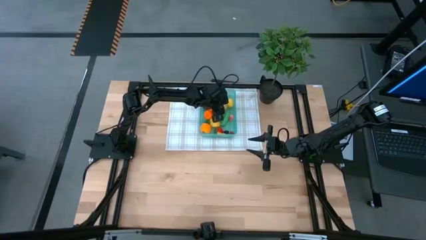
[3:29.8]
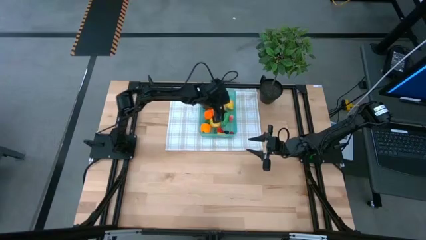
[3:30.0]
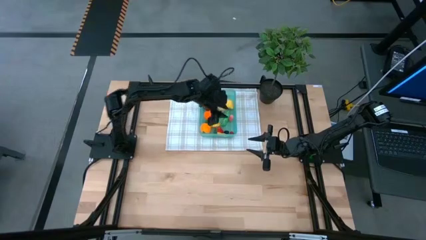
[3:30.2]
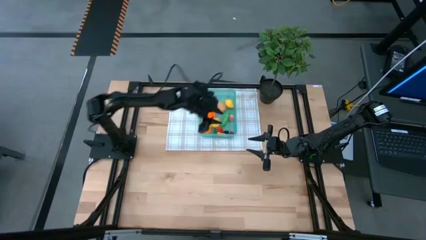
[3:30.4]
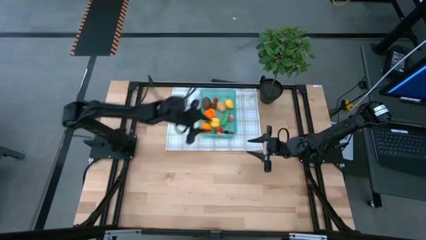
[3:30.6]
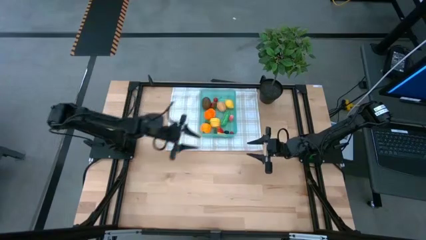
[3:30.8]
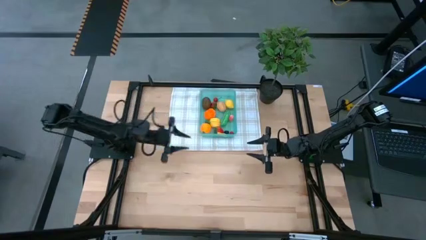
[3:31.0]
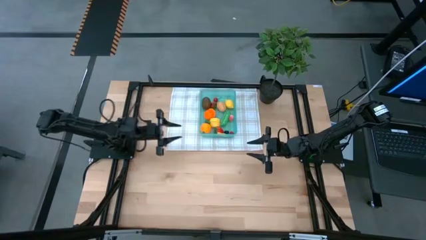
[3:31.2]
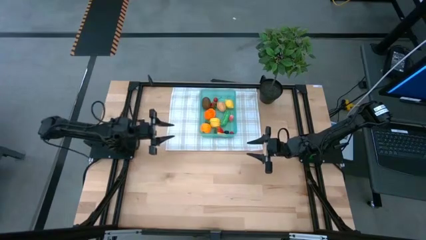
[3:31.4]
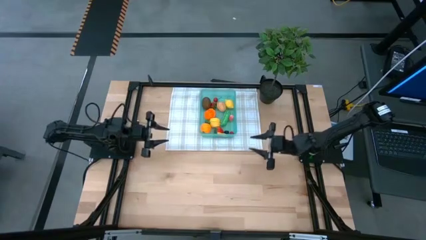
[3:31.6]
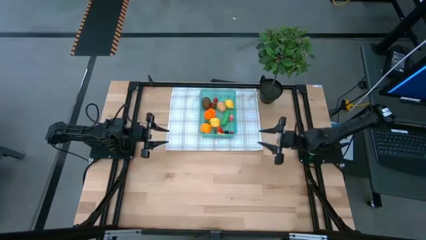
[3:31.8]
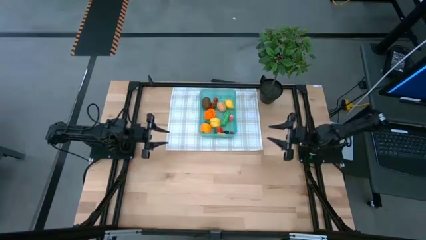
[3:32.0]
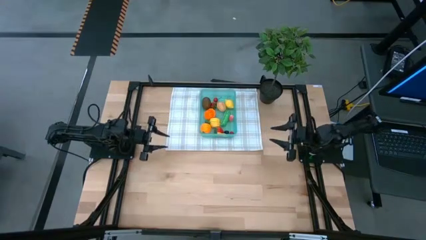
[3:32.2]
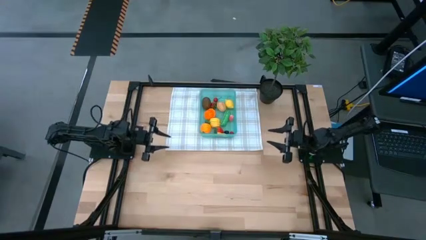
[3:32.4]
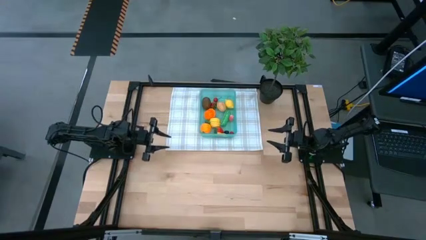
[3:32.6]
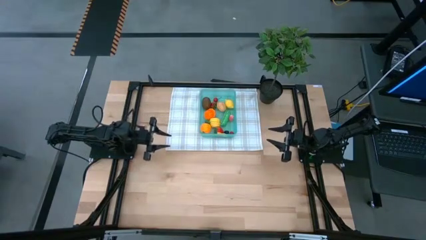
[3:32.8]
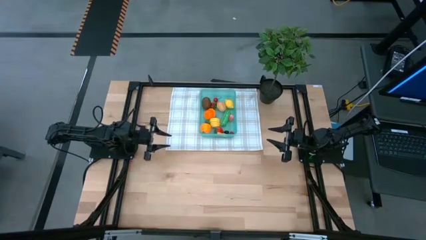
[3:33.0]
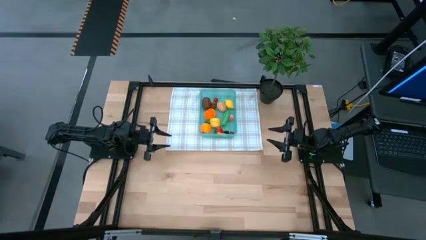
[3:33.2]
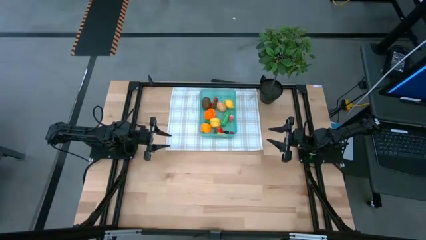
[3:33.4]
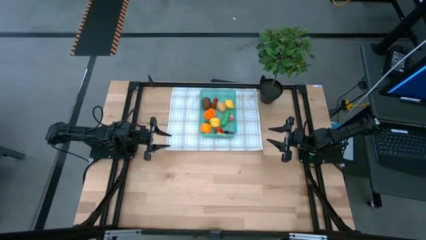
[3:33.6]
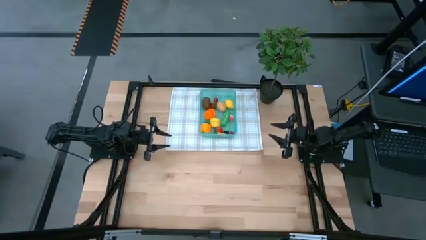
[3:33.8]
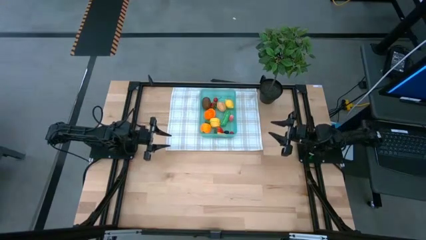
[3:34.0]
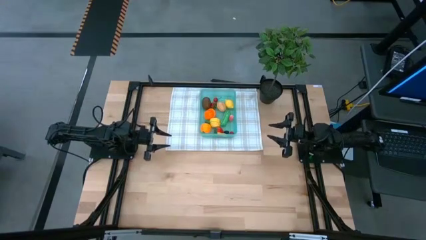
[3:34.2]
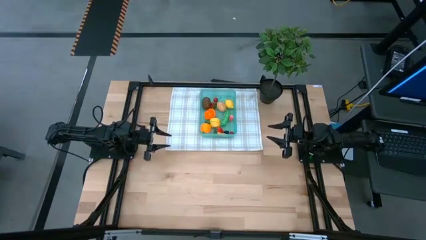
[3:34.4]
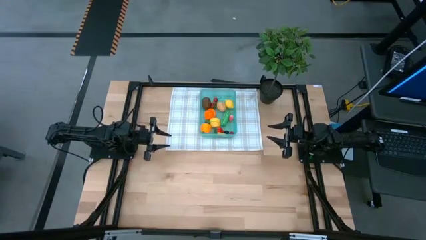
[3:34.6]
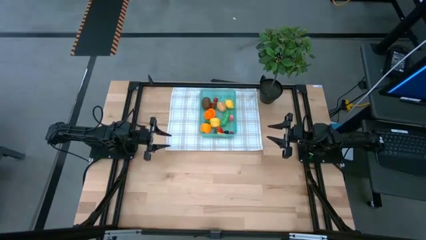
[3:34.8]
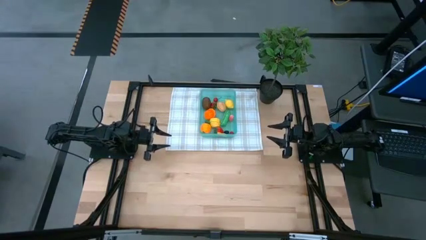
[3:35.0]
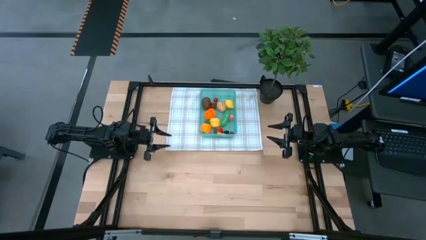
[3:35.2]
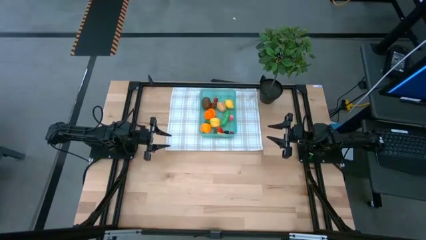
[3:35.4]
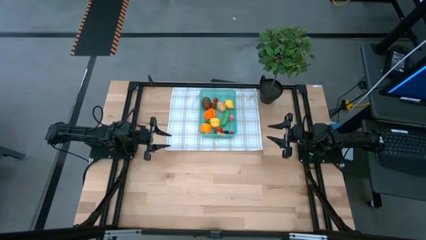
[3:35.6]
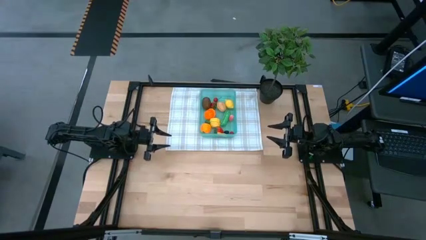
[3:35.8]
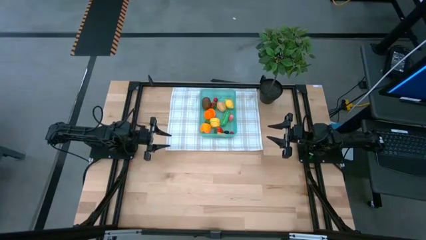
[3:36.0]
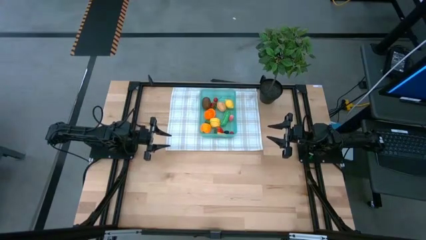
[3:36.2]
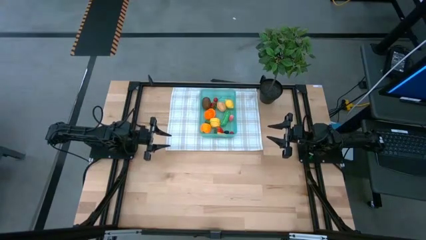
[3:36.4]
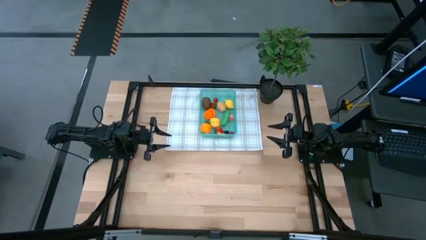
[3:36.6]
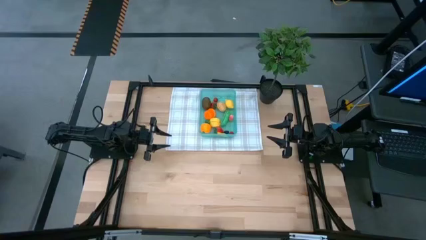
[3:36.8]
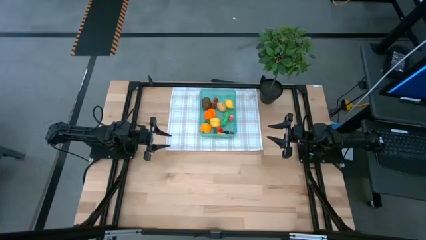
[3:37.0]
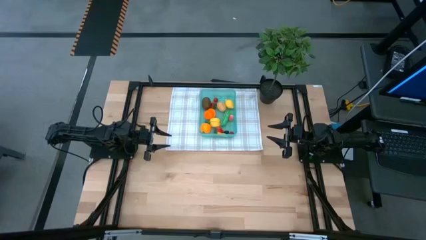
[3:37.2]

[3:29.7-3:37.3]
Task: Pick and placing Produce into tupperware
Return to Home Position

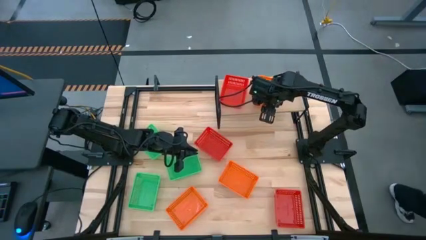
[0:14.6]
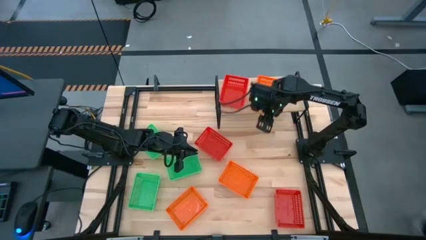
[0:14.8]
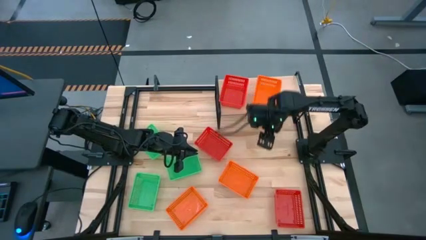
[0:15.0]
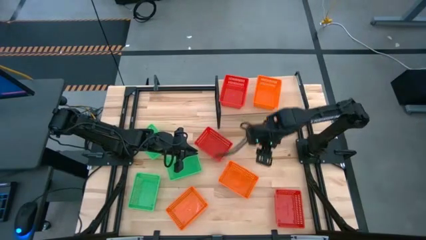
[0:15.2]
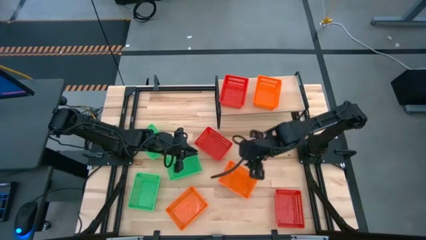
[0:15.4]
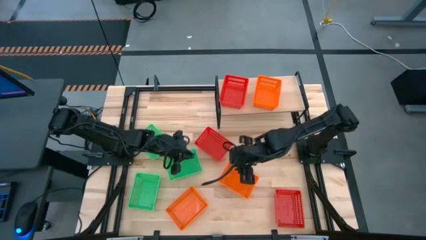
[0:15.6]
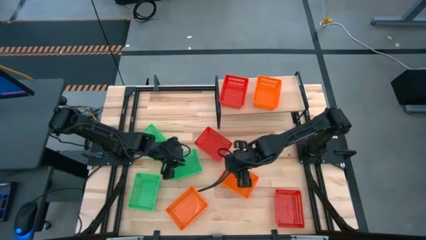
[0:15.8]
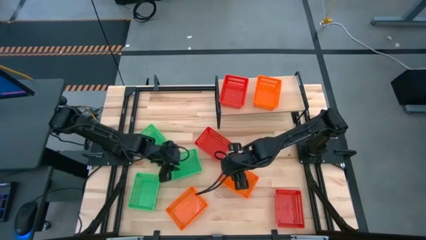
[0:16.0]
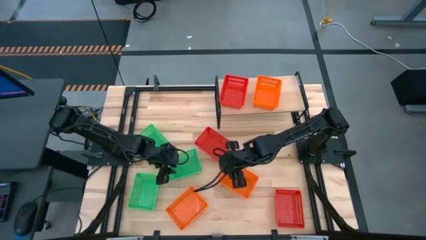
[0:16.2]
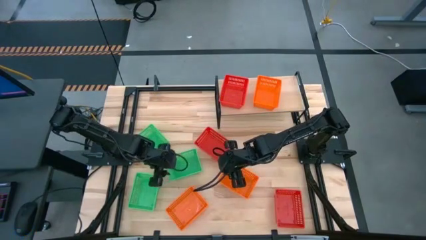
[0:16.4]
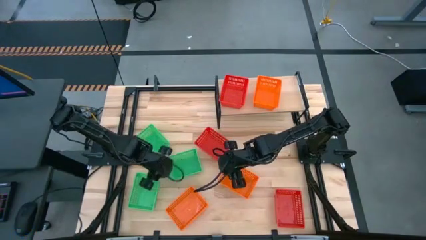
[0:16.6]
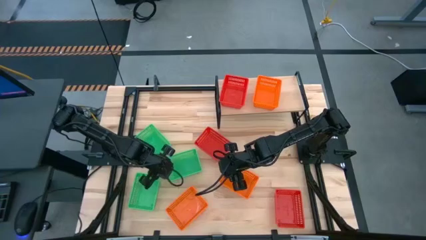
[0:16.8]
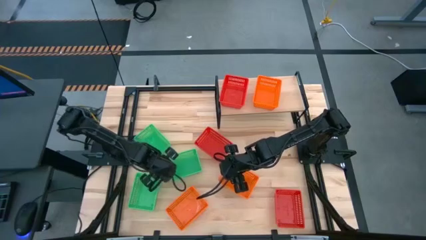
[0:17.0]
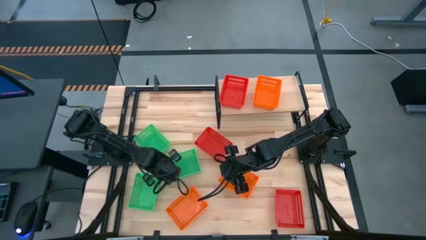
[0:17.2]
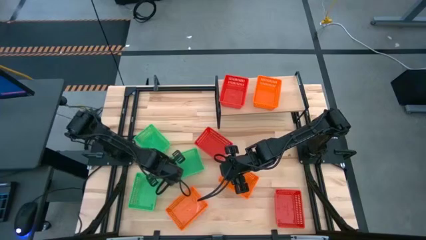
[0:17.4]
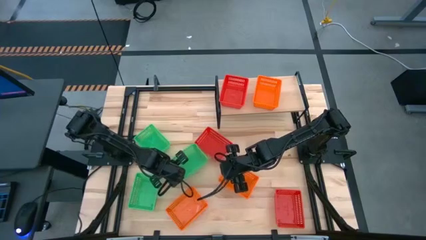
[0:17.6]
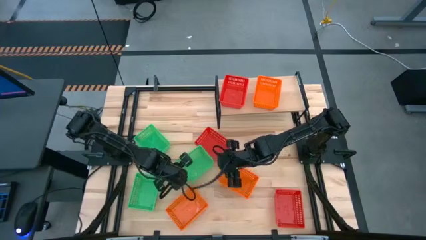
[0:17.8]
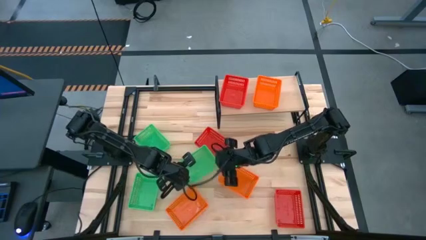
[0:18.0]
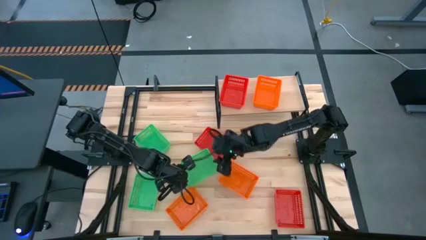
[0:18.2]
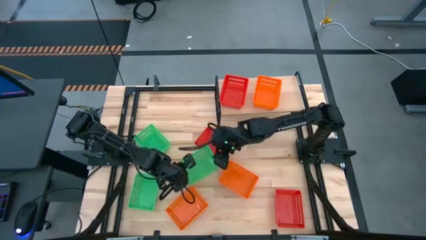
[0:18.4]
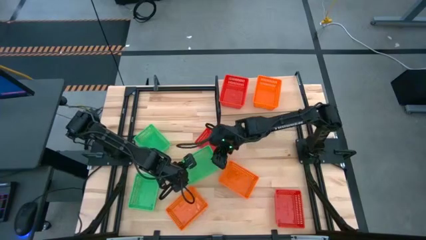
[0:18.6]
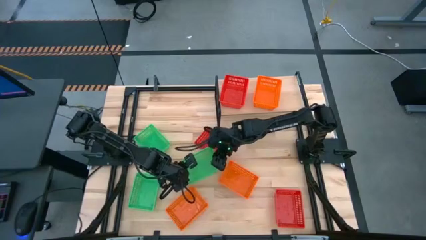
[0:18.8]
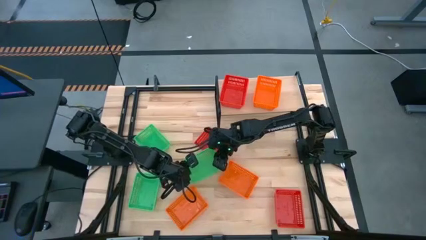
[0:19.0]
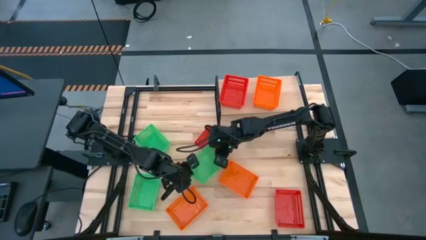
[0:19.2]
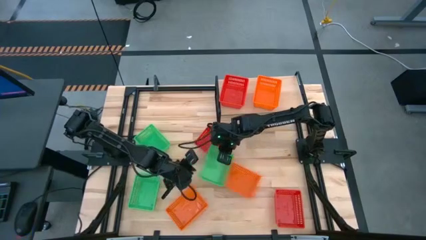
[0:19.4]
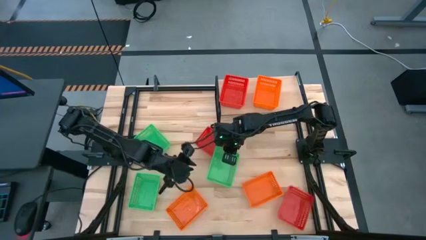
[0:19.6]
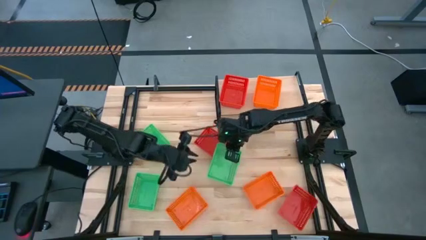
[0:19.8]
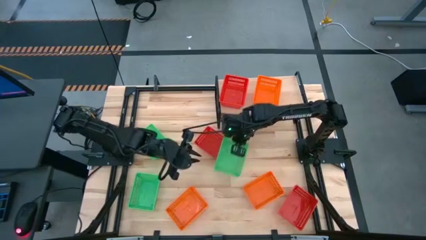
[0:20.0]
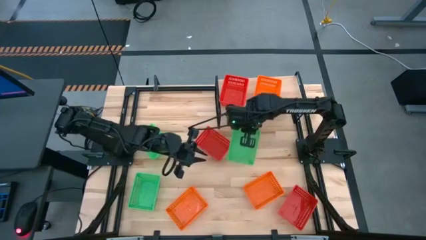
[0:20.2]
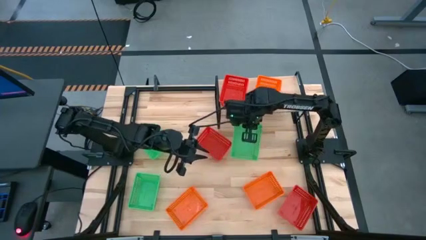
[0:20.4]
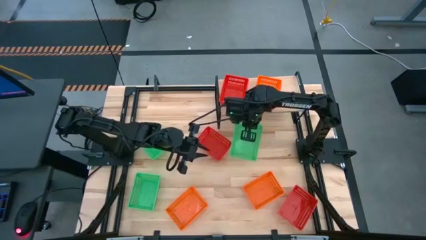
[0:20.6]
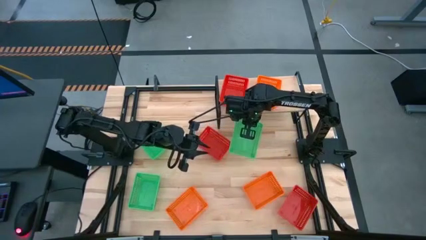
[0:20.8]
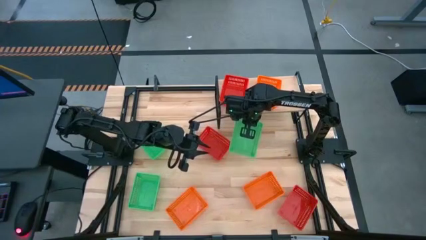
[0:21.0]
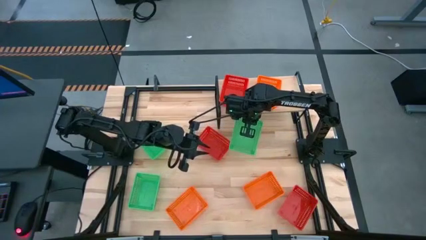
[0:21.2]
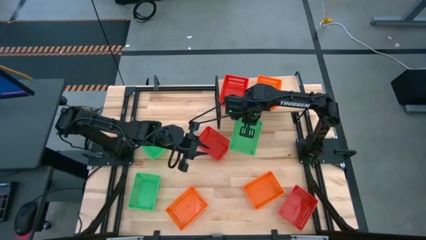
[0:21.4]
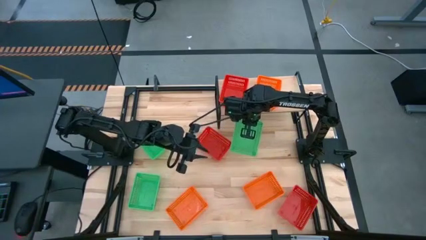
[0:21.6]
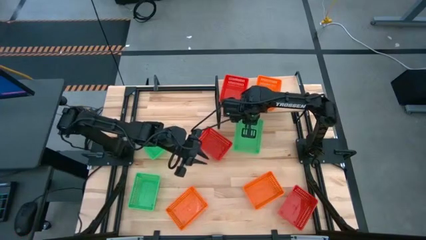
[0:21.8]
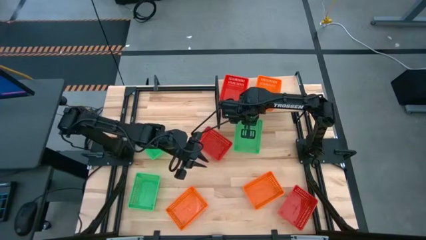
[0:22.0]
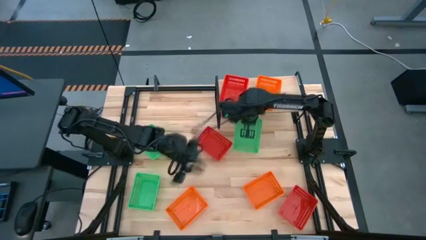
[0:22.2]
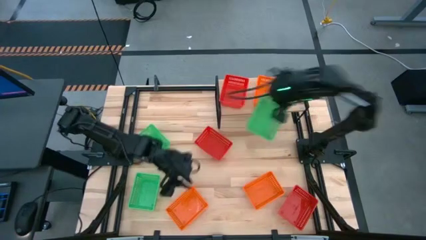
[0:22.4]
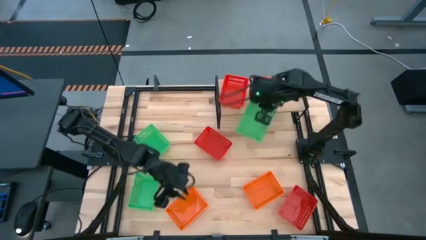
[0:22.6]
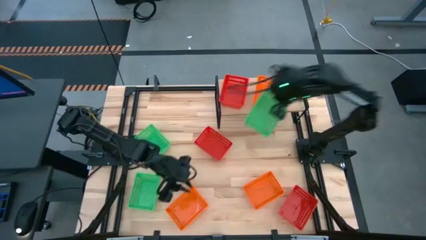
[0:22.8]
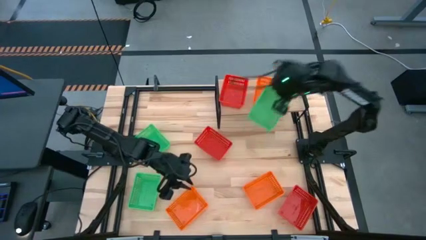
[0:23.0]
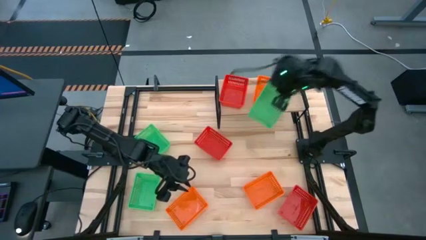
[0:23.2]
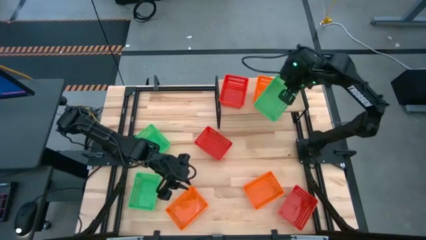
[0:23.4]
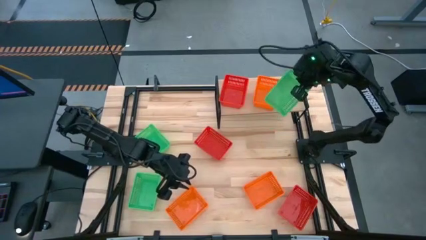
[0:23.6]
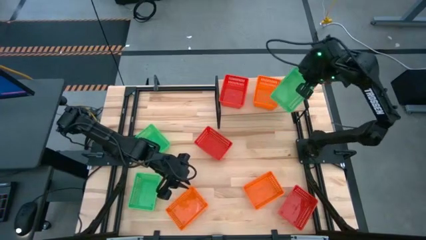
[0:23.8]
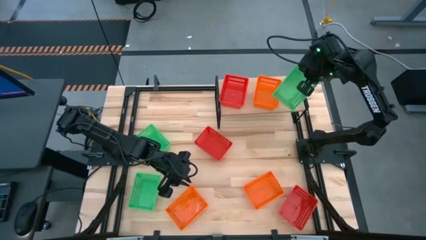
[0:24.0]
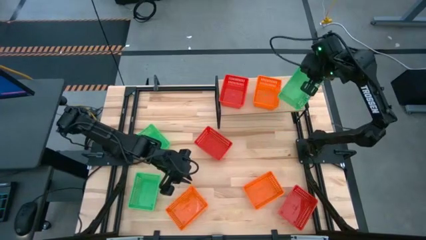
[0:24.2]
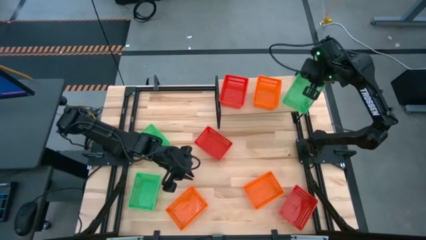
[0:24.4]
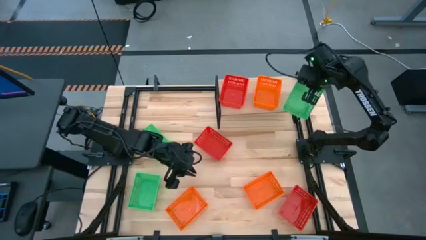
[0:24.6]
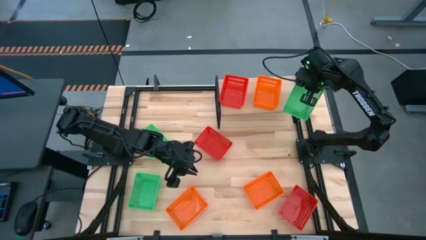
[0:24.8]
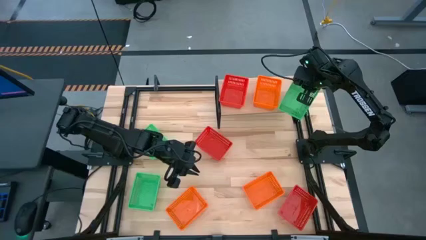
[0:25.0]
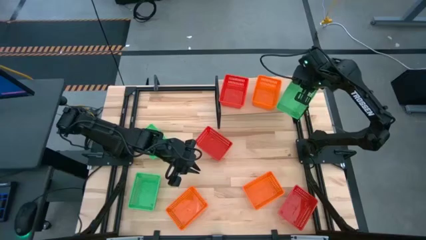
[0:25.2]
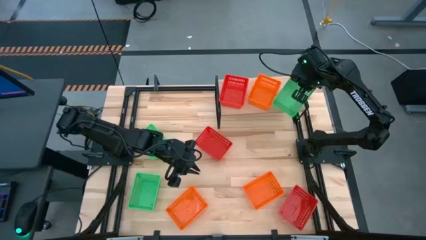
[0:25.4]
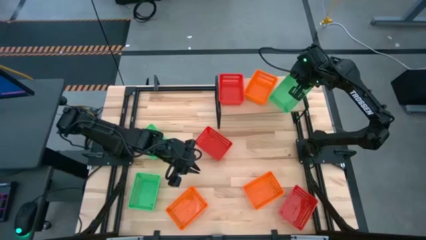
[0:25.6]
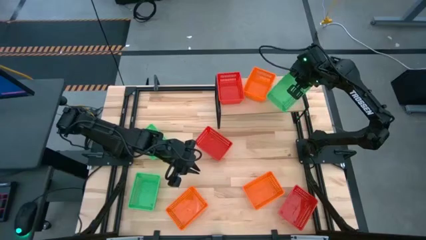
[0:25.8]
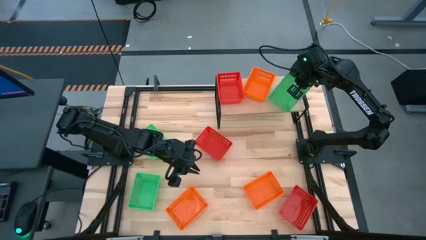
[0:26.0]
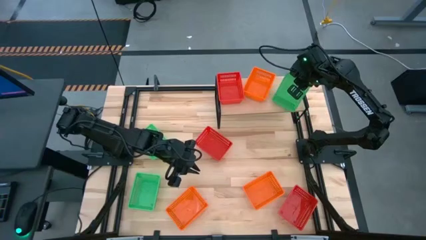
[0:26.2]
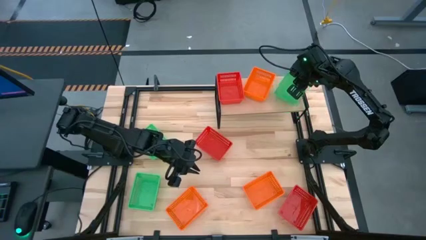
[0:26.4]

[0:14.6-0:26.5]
Task: Stack baskets on shelf by color
Put the right green bin on the shelf
